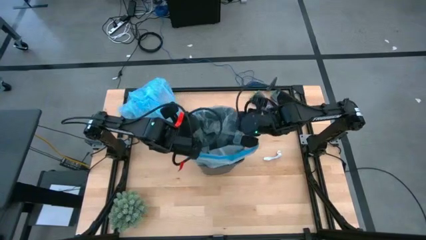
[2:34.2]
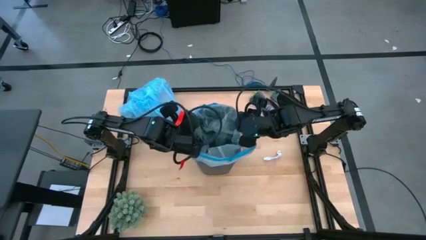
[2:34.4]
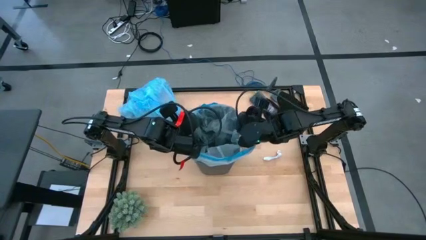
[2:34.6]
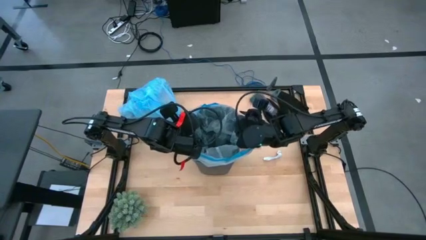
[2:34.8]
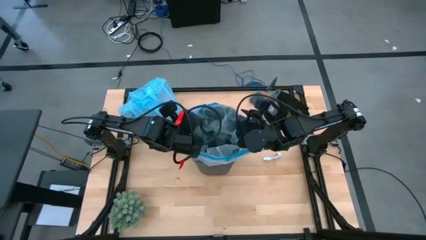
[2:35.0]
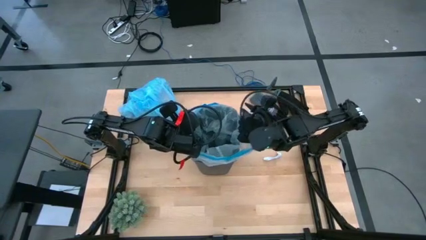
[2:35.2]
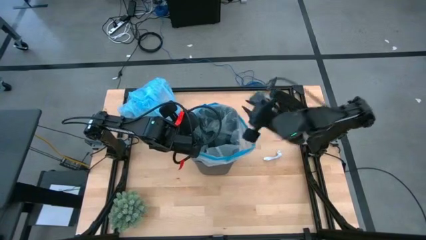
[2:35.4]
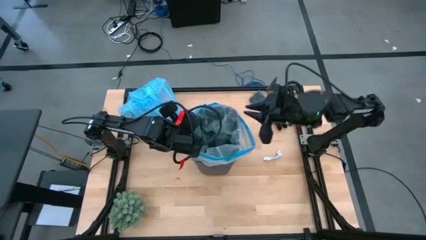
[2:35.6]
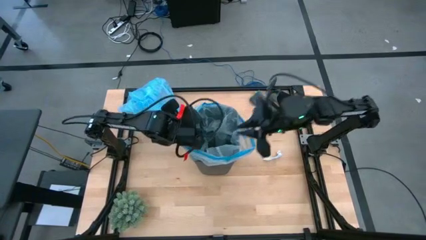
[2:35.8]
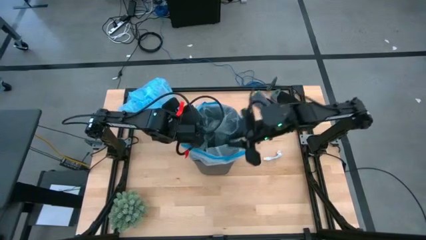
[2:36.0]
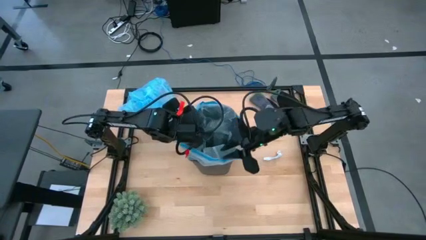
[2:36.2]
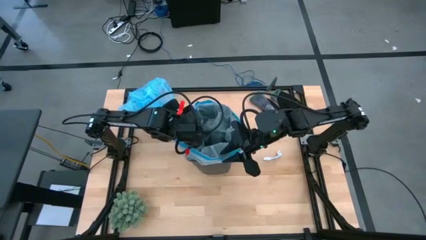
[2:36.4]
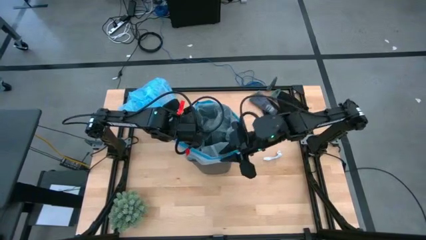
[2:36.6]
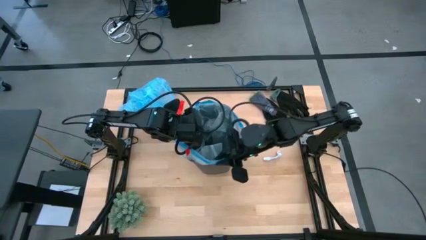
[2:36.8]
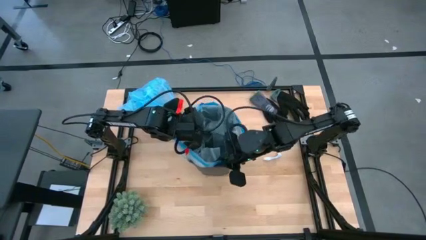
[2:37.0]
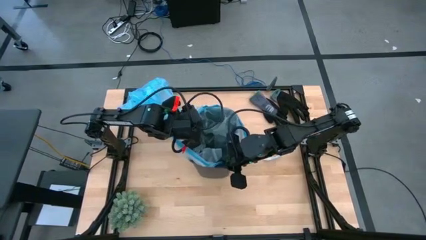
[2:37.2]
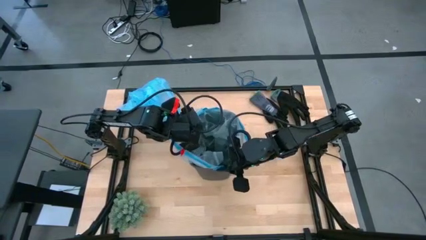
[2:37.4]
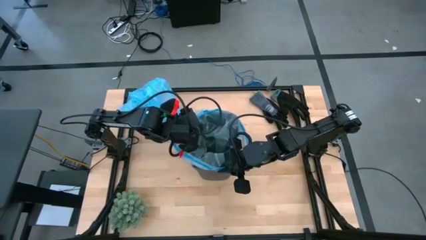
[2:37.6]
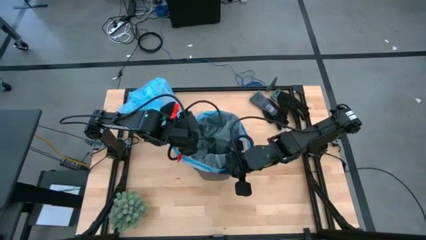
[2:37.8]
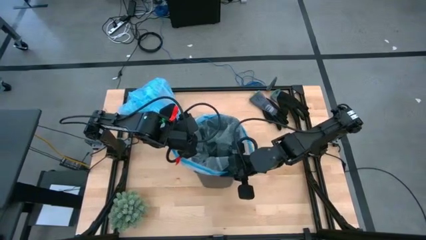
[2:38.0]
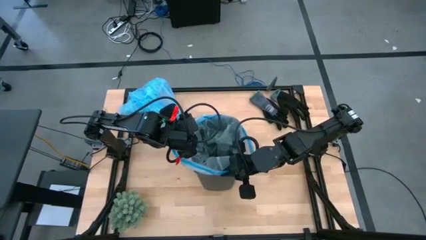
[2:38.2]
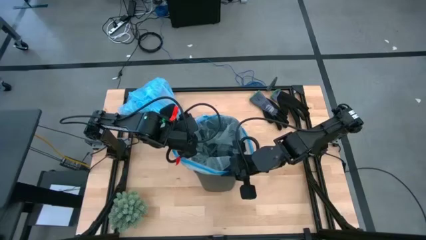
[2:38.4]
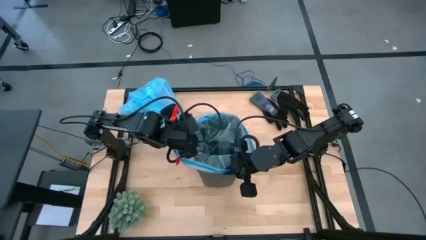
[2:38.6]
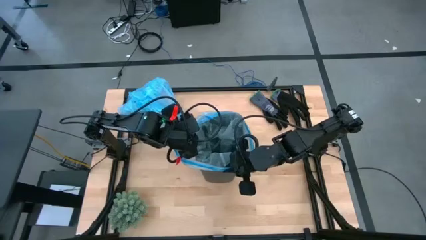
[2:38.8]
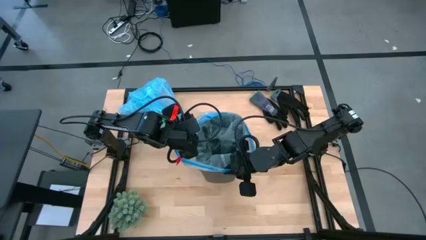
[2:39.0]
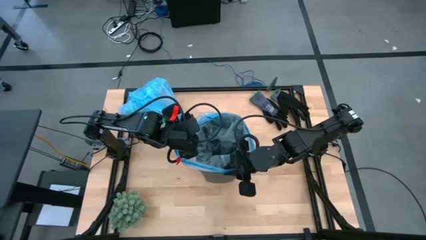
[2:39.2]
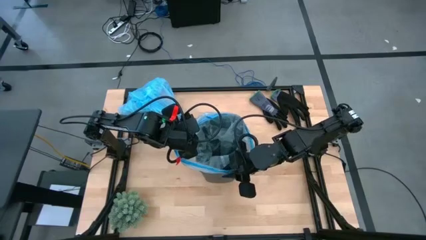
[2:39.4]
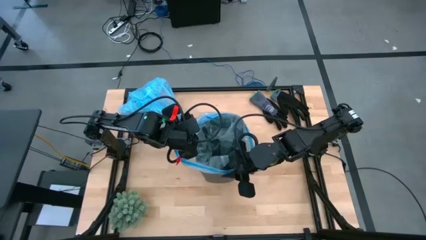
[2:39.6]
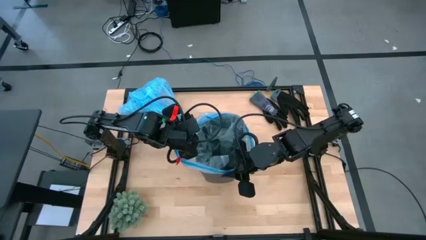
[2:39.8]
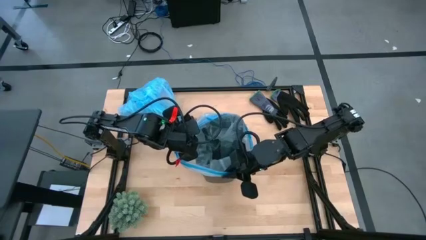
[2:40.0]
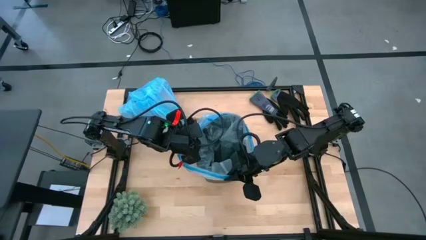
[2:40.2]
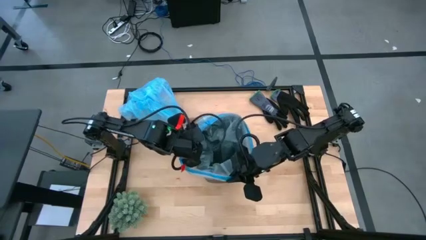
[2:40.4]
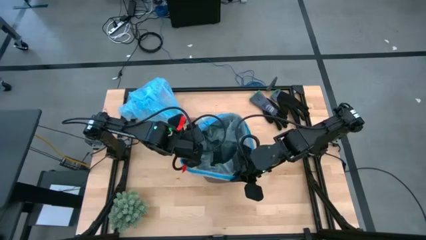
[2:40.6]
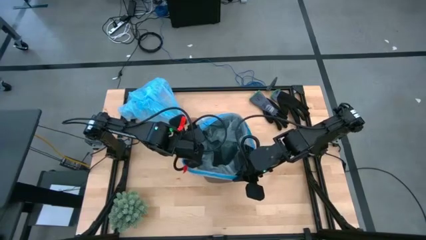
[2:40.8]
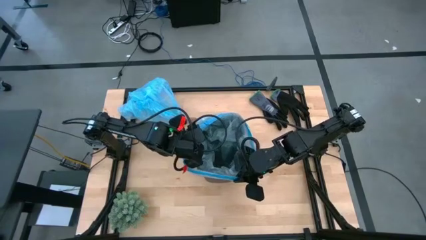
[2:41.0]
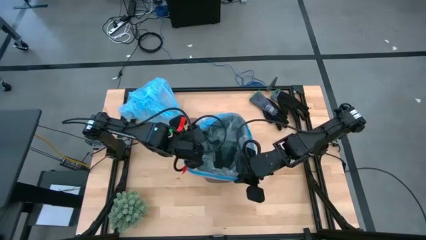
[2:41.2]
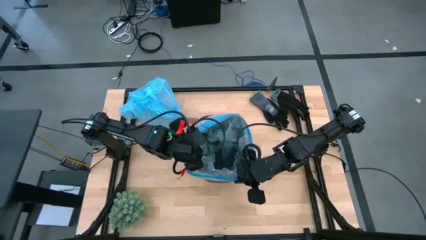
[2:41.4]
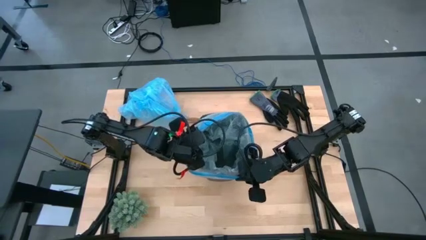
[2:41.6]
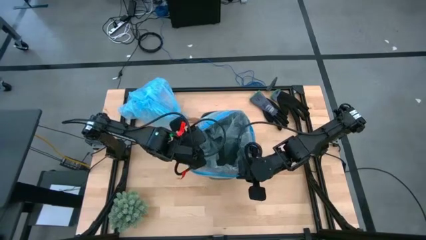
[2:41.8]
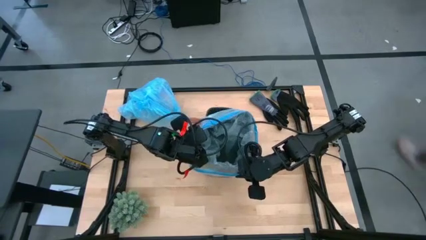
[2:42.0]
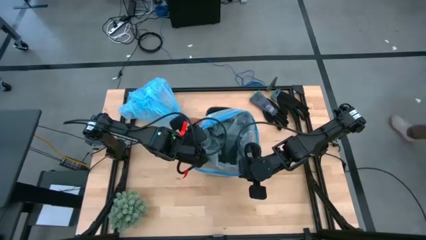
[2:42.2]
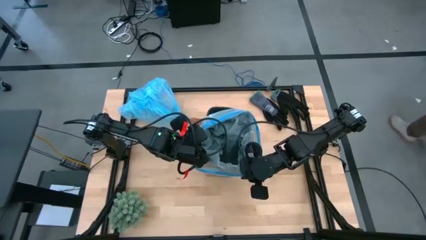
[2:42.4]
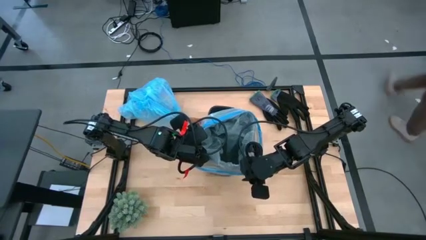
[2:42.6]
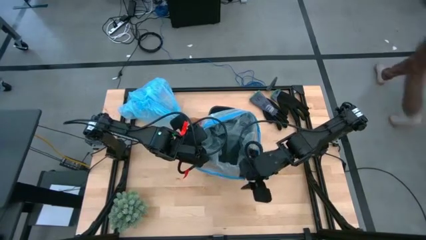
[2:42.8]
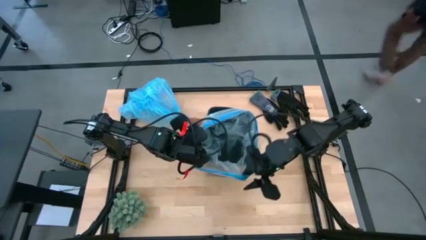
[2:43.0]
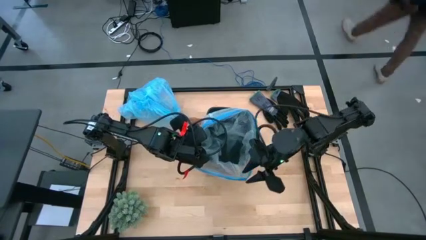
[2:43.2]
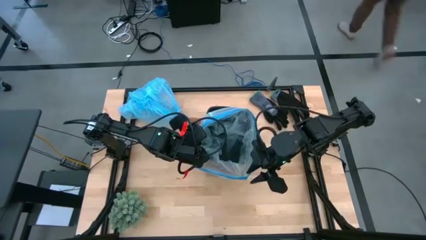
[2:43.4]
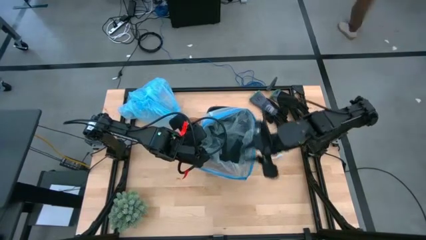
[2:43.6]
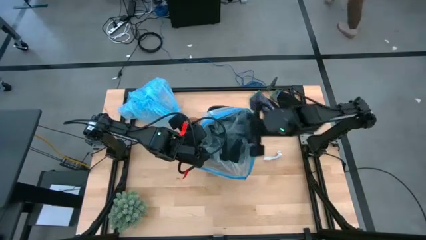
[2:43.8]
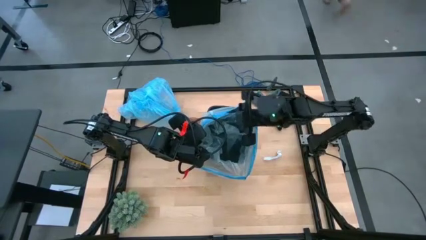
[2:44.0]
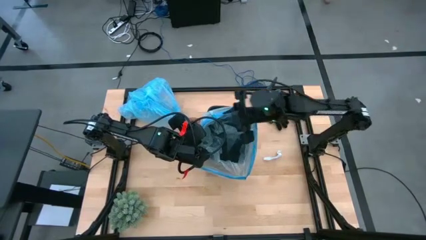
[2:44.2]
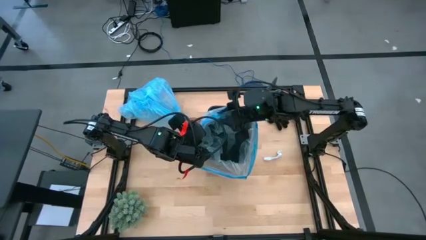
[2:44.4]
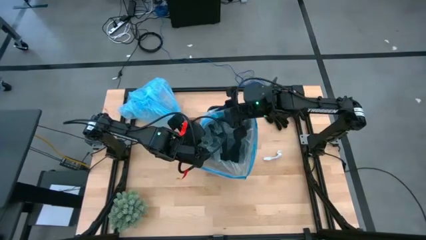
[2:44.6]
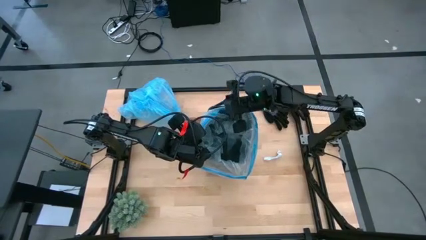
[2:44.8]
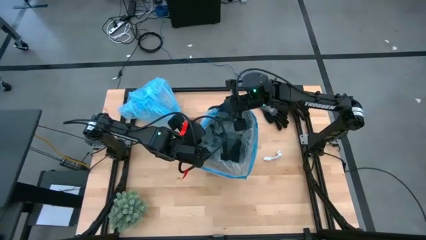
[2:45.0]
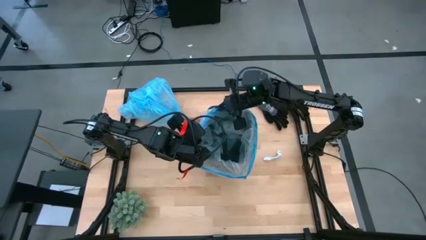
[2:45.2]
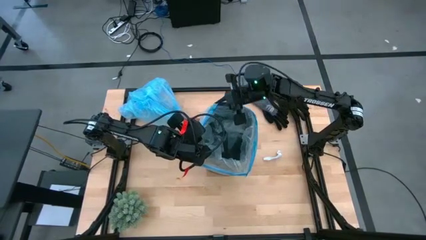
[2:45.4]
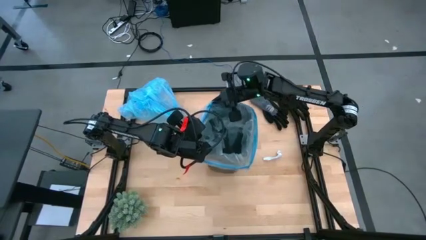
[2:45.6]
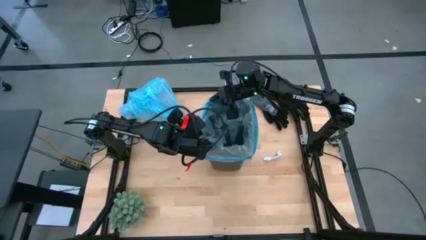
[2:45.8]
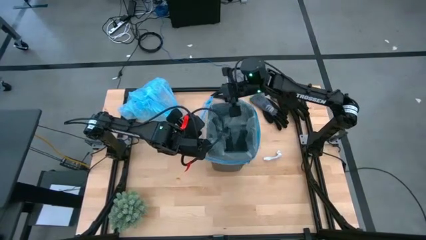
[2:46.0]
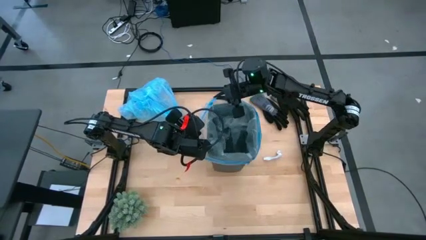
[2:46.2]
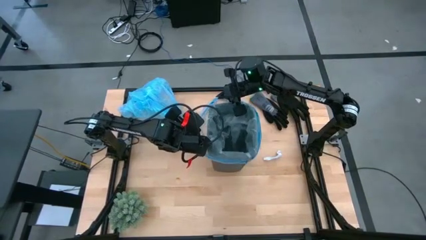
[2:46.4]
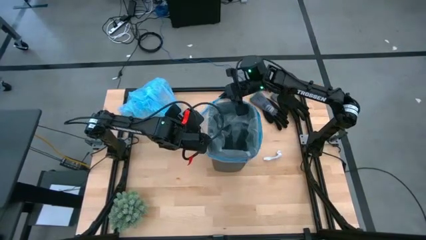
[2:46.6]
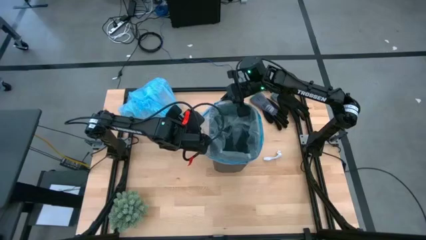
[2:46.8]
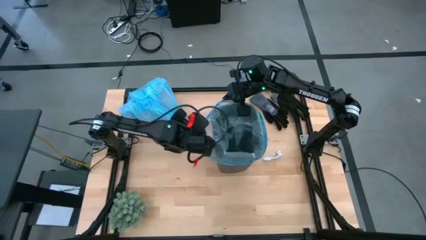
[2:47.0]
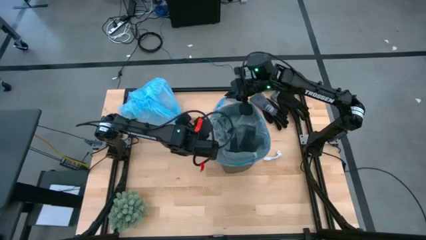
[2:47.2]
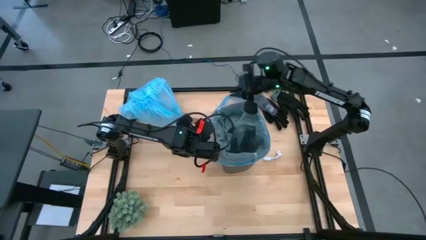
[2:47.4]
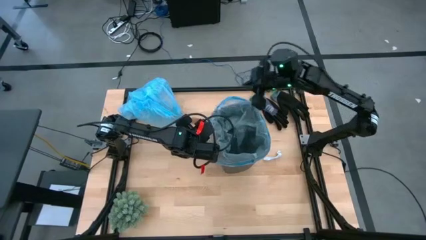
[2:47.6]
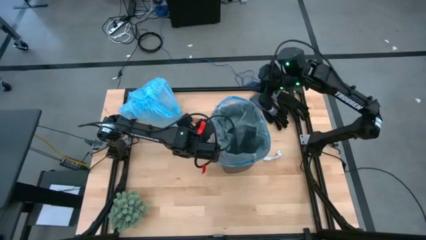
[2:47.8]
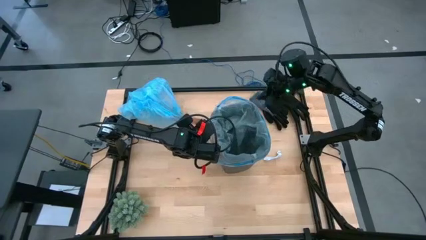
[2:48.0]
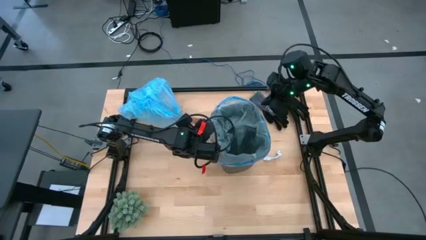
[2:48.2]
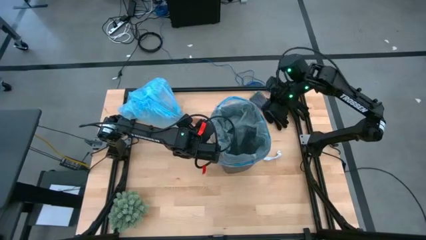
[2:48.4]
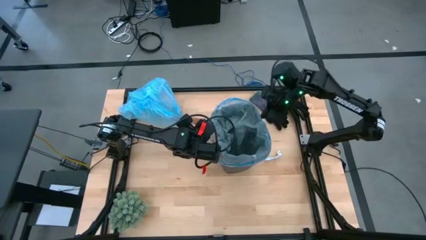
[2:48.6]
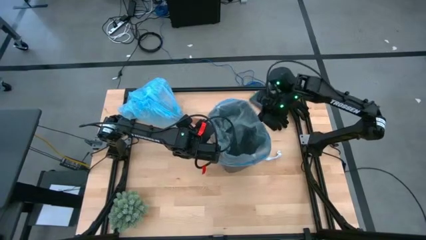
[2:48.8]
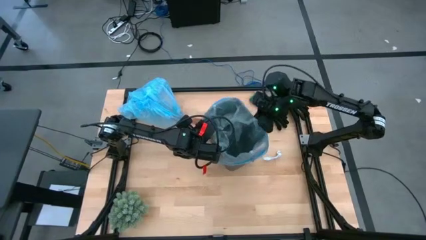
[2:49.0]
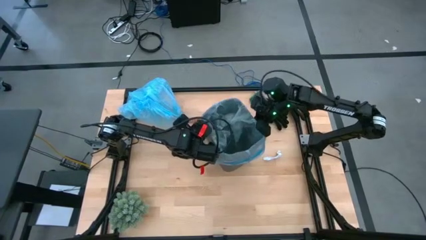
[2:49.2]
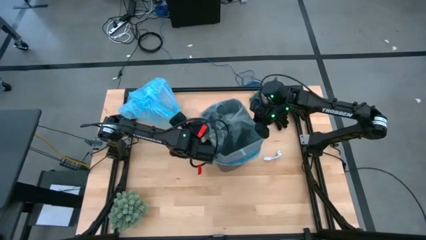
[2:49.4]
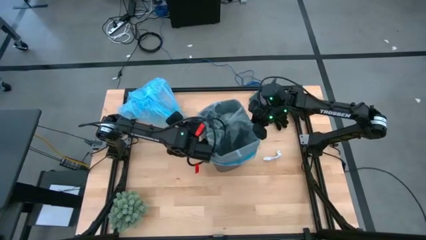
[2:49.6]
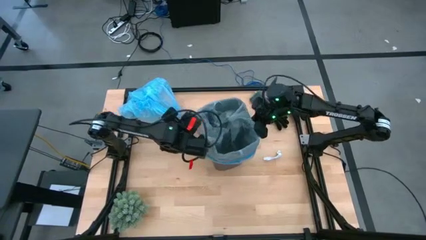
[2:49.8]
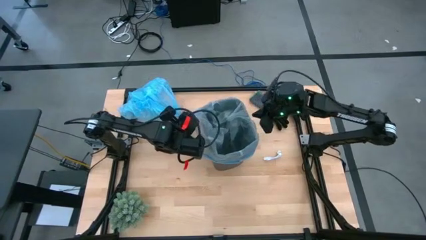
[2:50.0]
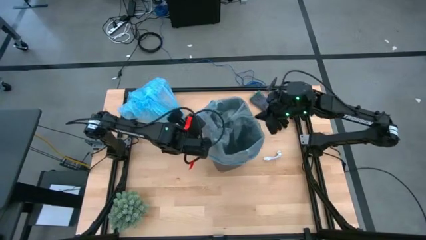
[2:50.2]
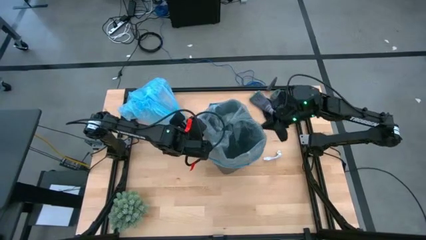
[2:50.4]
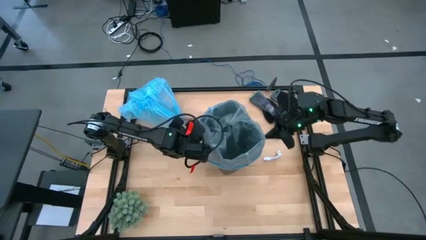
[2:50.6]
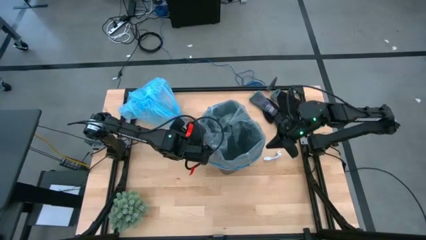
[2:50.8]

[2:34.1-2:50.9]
Task: place trash/remove bag and relplace
Insert a new trash bag into the bin
